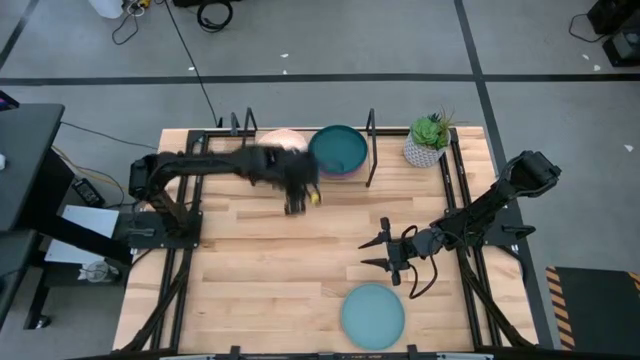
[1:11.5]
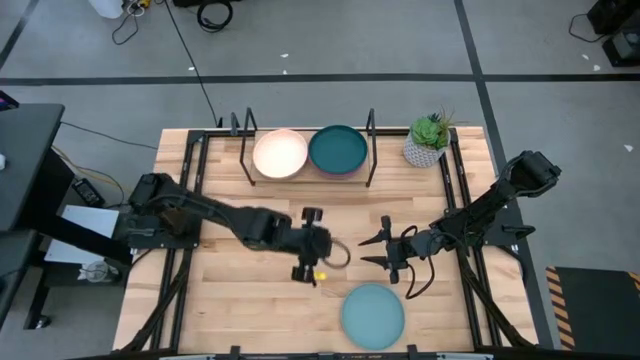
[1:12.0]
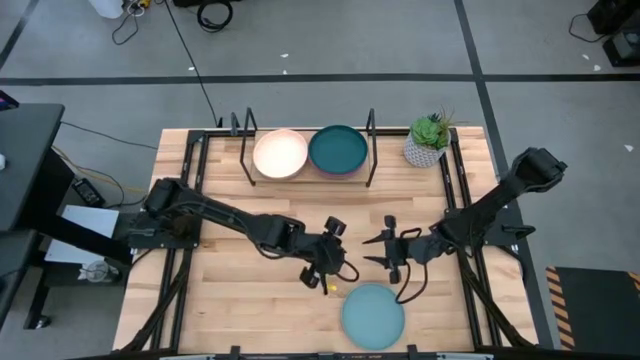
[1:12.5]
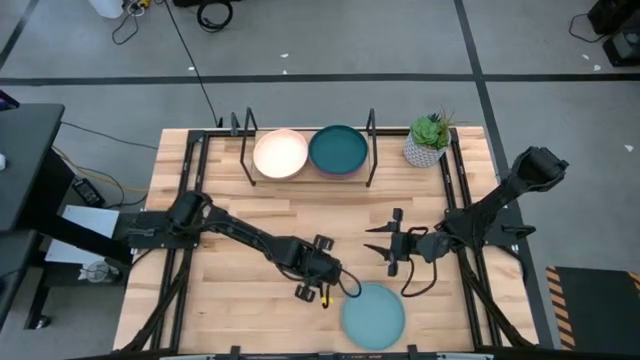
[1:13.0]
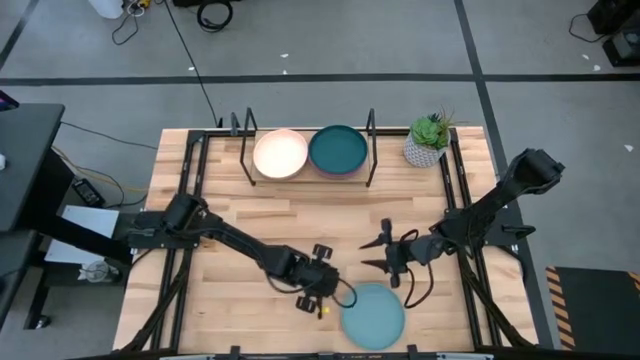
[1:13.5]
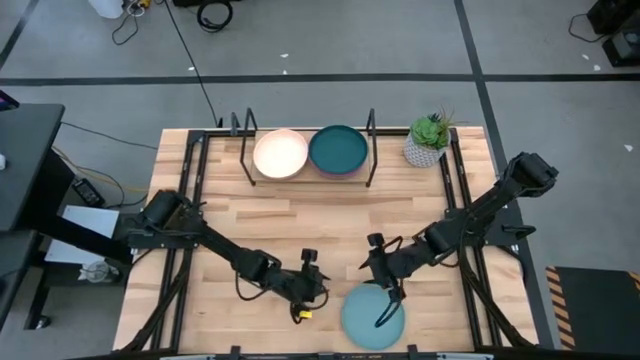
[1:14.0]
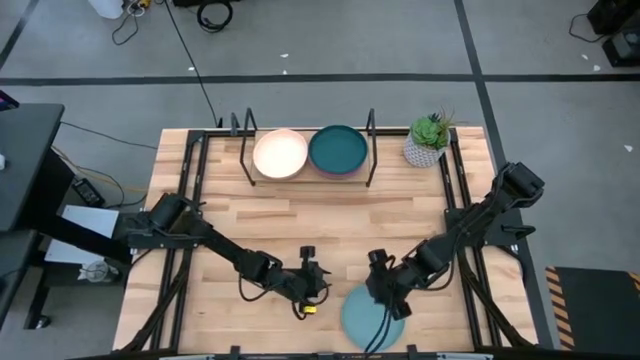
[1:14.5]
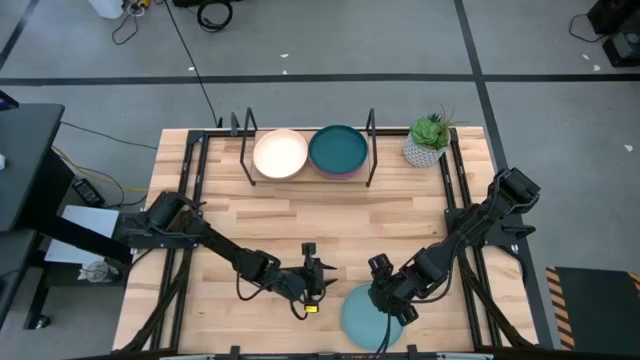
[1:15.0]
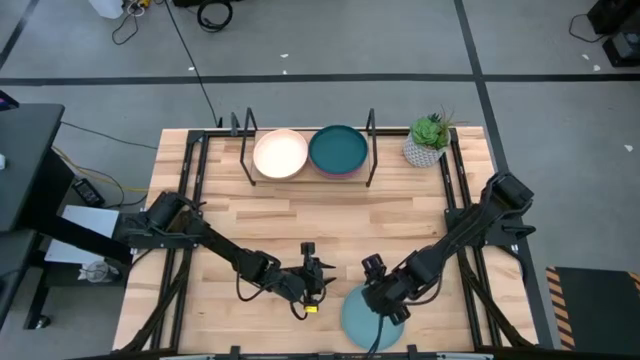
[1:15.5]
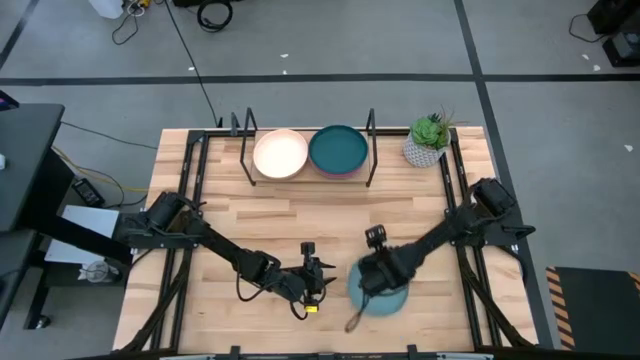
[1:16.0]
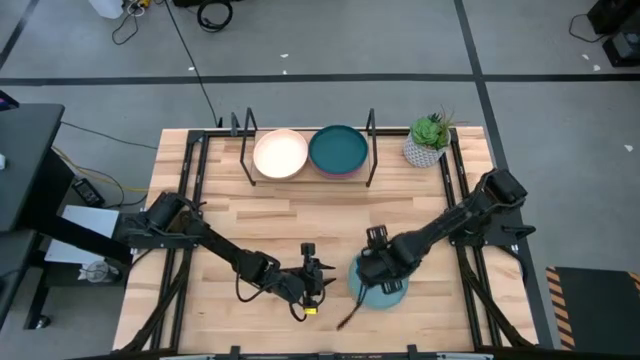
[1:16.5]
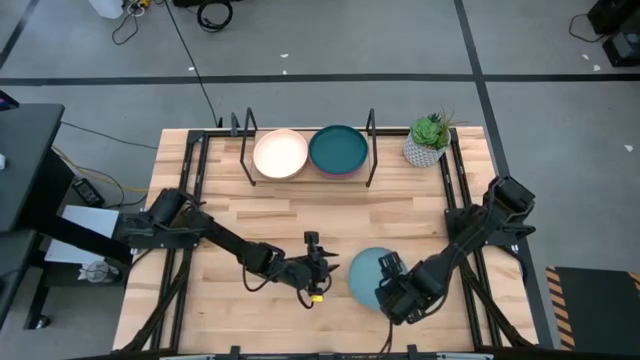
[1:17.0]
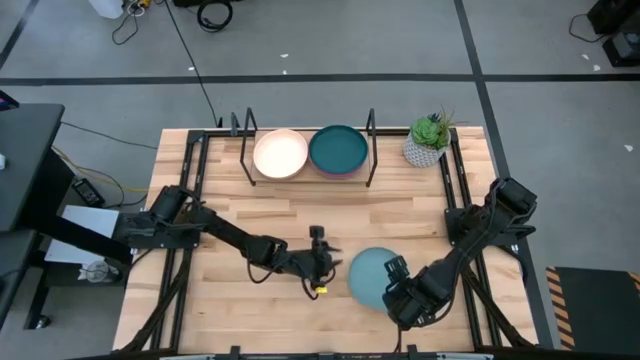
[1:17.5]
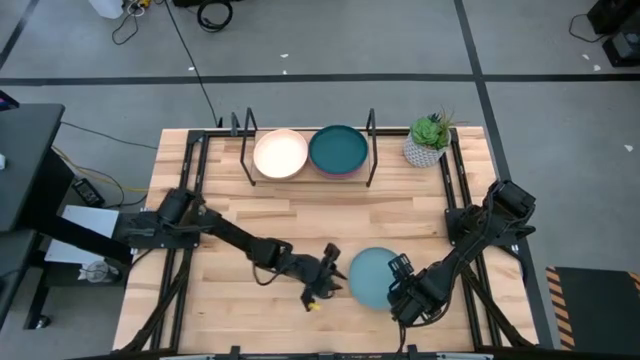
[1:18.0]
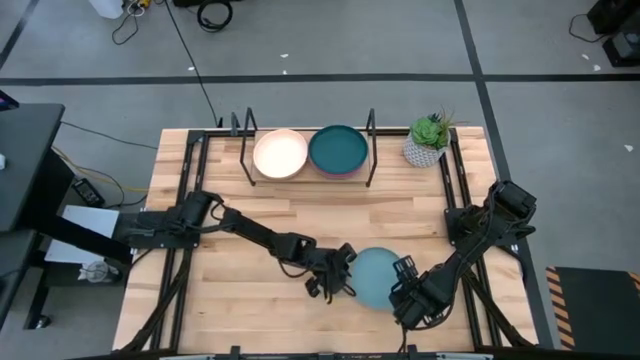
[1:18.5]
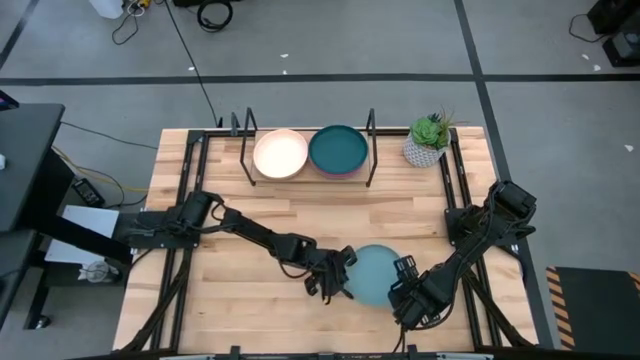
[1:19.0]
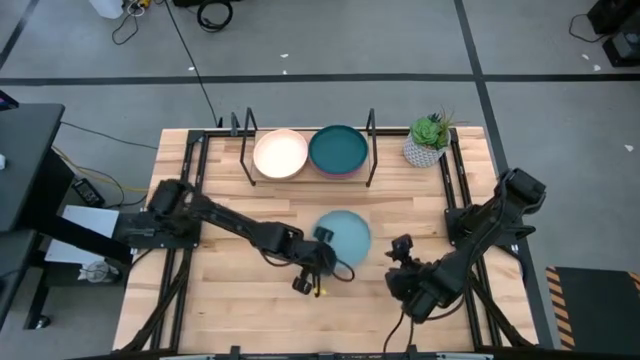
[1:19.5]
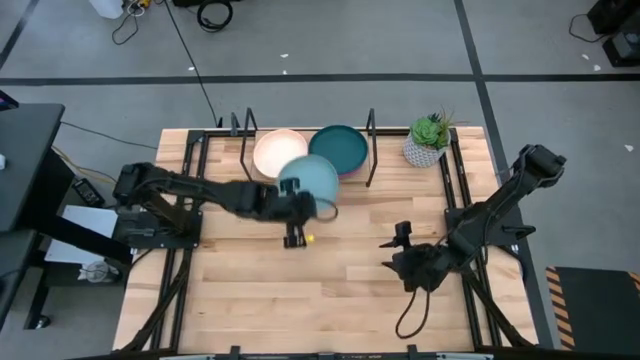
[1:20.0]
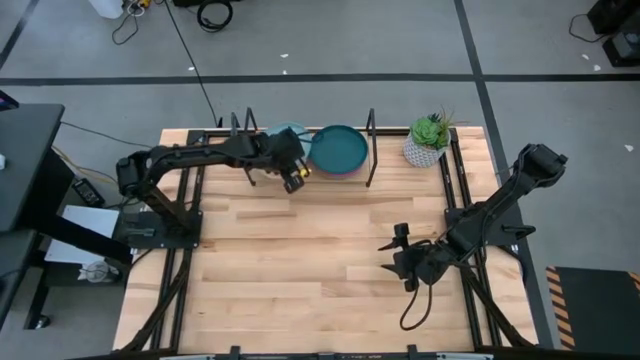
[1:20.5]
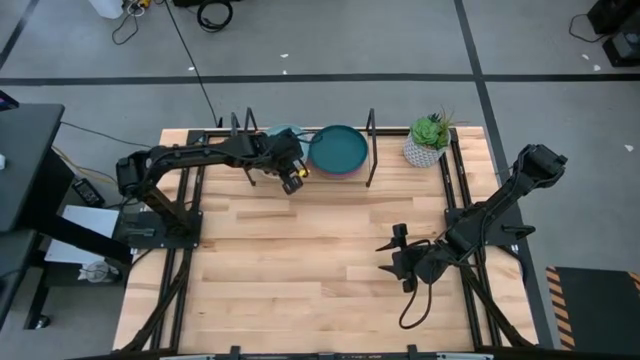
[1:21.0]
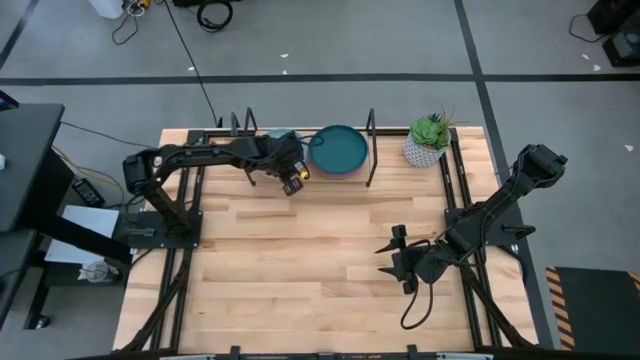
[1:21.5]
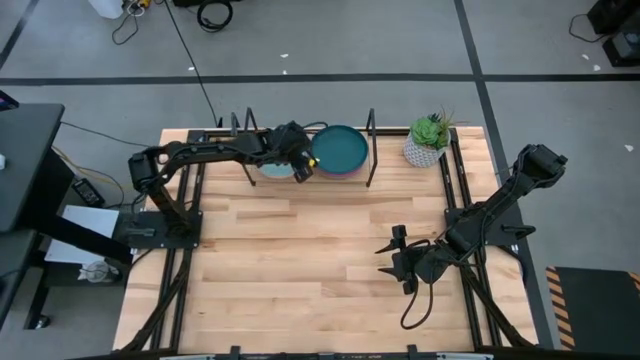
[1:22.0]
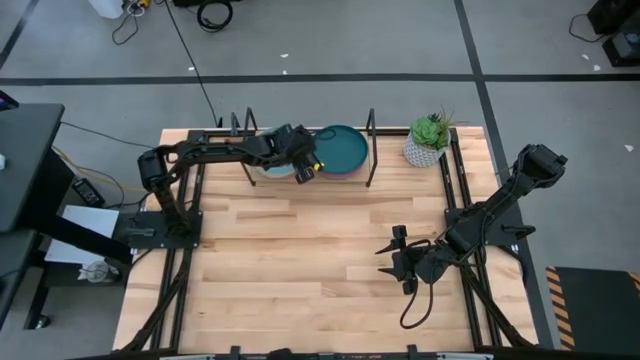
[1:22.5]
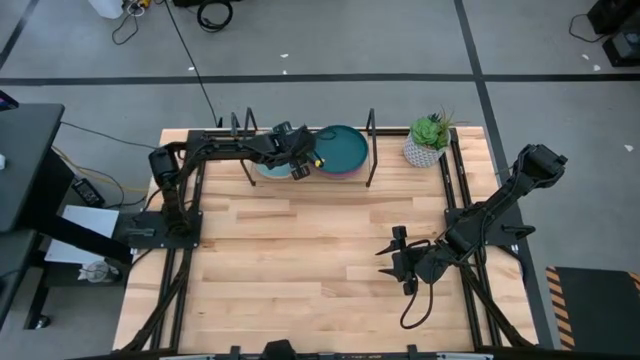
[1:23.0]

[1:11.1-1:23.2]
Task: Place and stack plates onto a shelf
Stack the light green plate on top of the white plate on the shelf

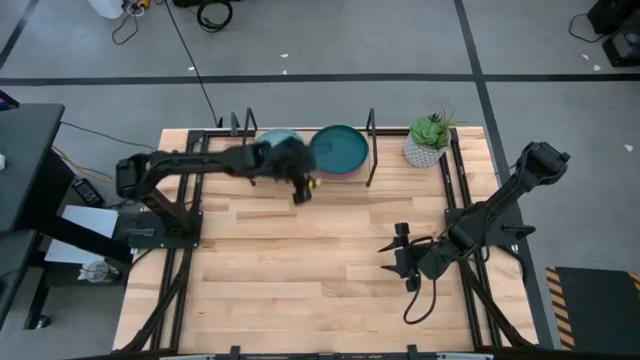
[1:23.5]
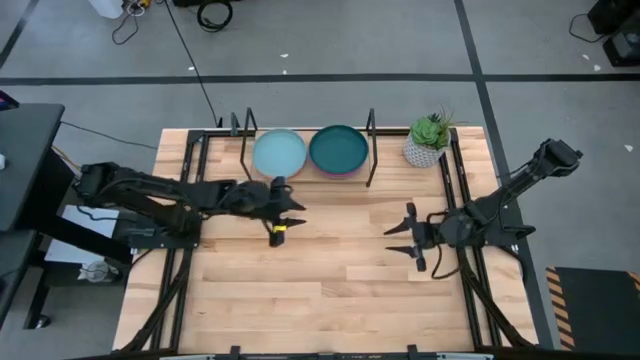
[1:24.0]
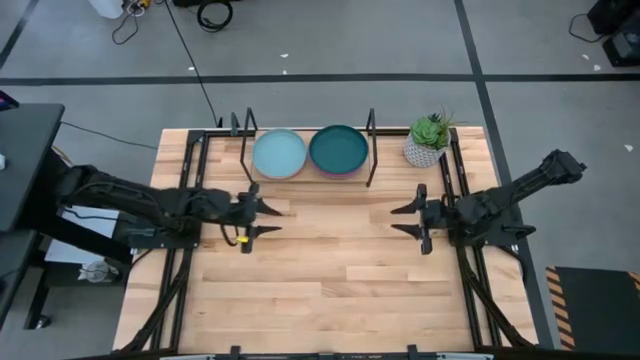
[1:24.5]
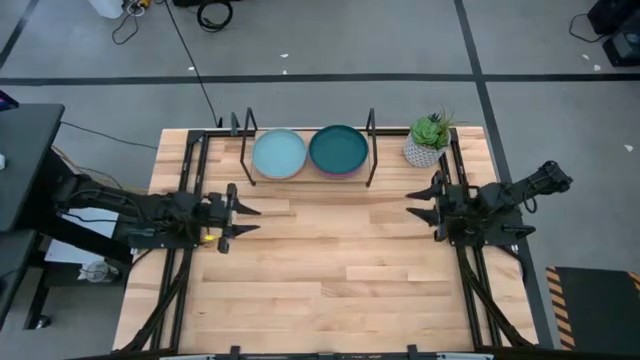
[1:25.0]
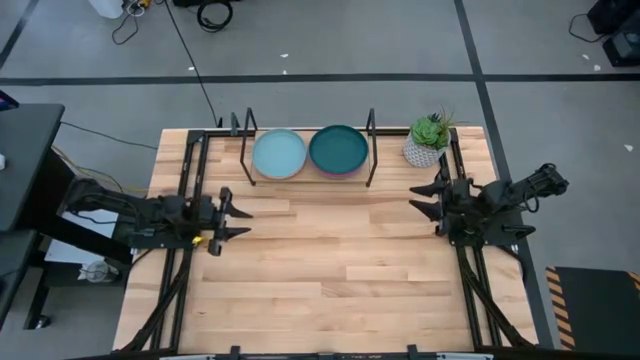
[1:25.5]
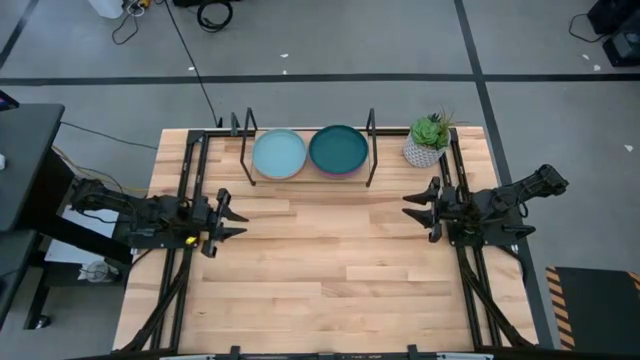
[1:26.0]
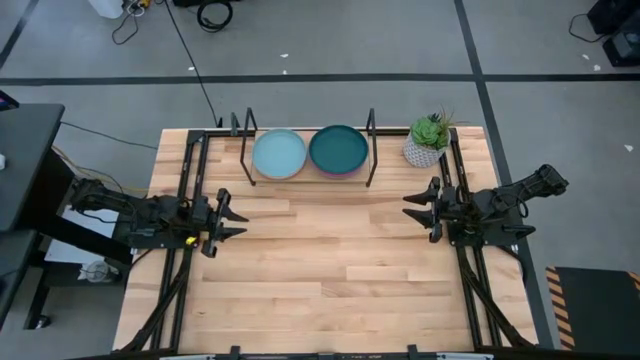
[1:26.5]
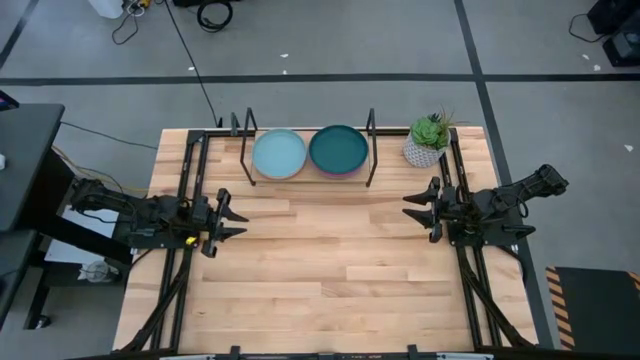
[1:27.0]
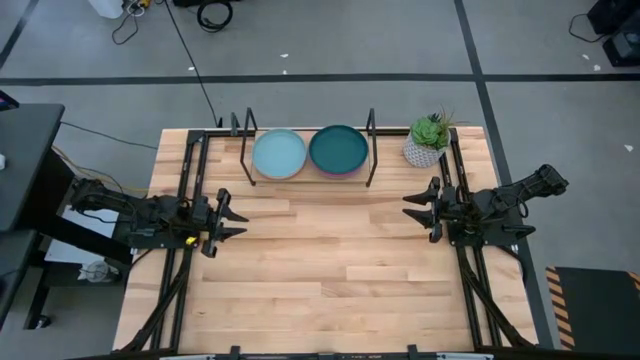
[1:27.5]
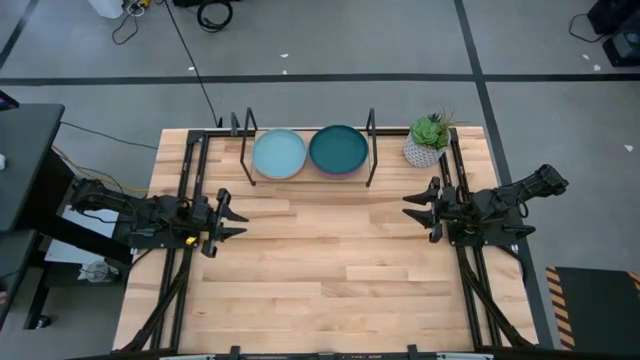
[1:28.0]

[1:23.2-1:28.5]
Return to Home Position

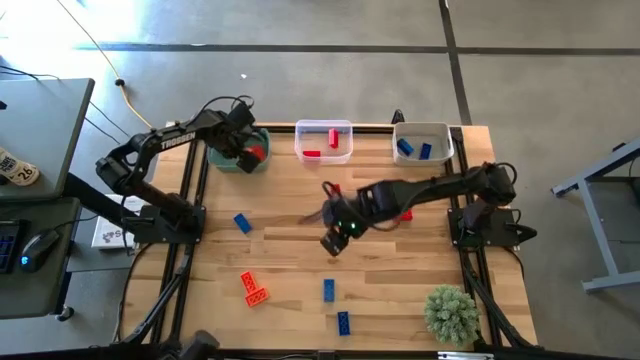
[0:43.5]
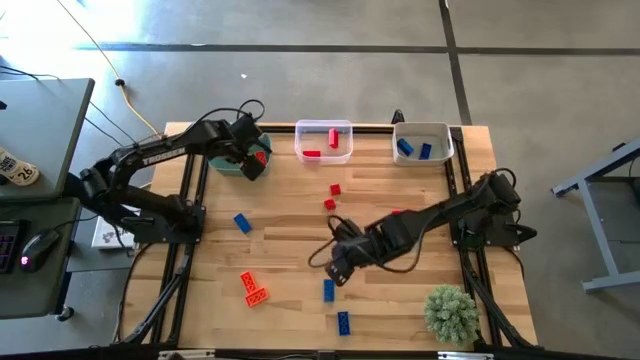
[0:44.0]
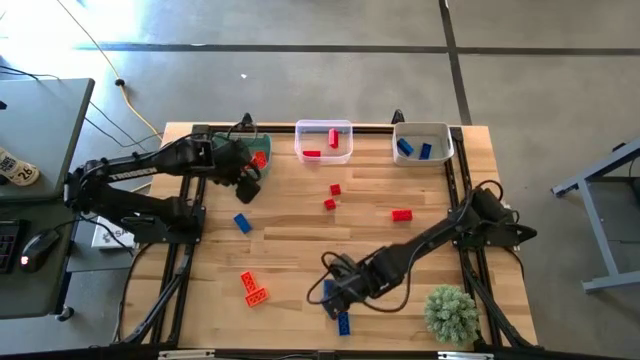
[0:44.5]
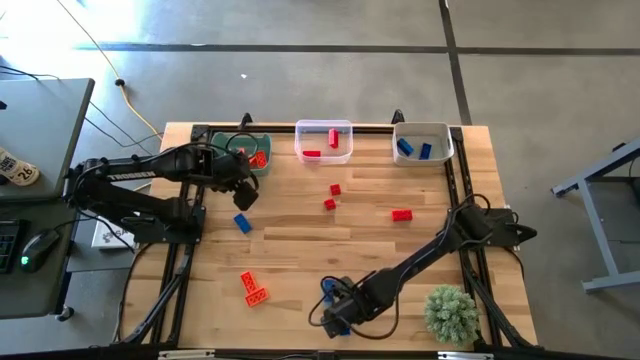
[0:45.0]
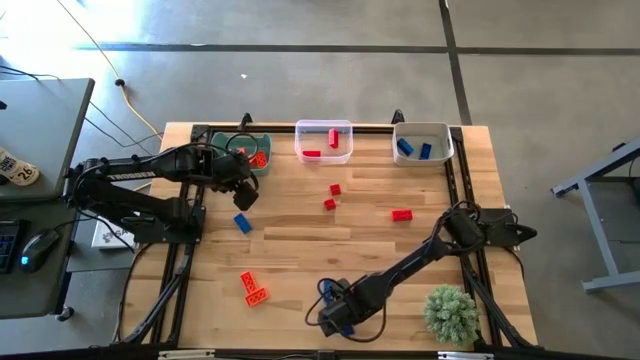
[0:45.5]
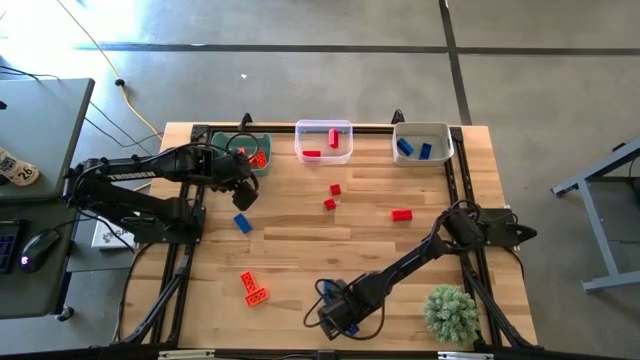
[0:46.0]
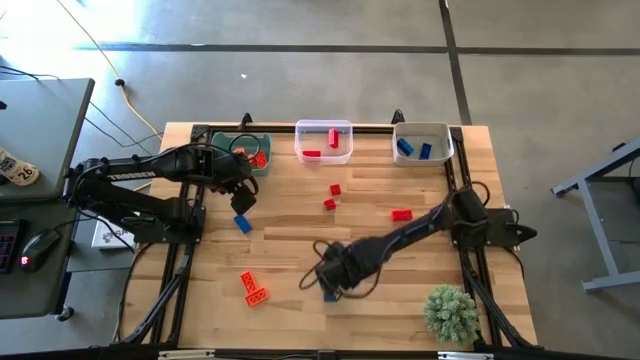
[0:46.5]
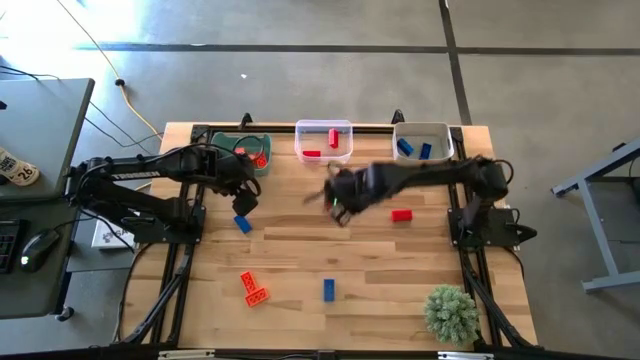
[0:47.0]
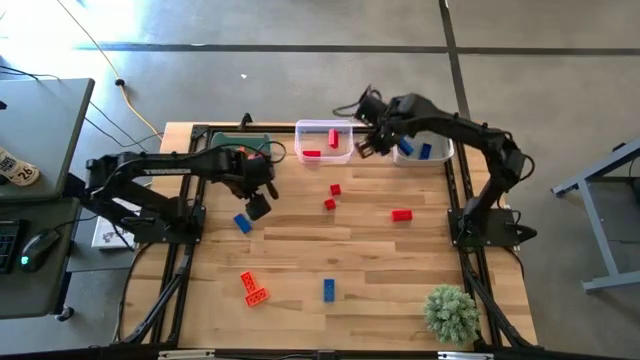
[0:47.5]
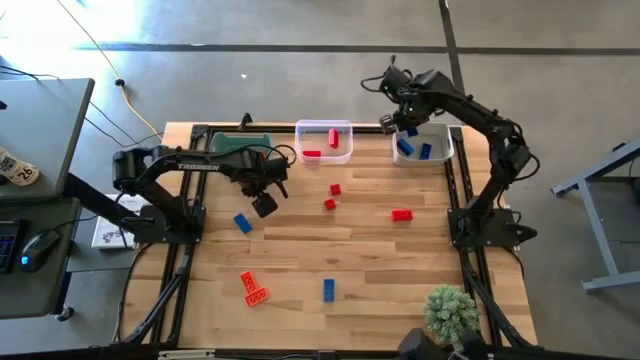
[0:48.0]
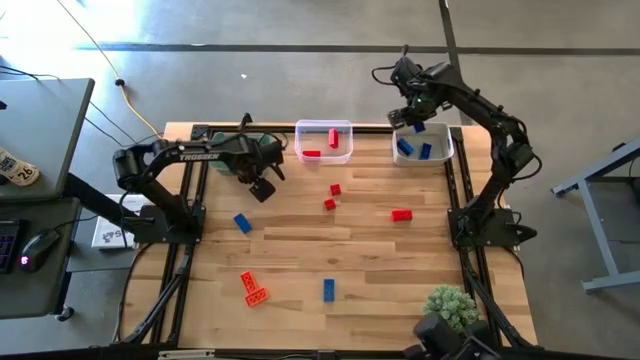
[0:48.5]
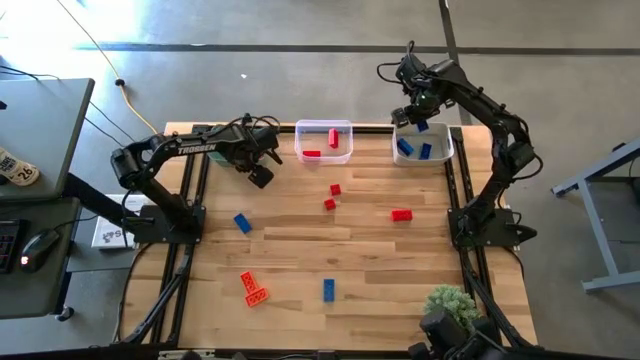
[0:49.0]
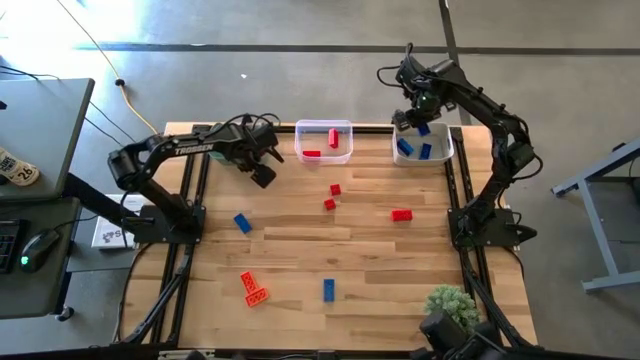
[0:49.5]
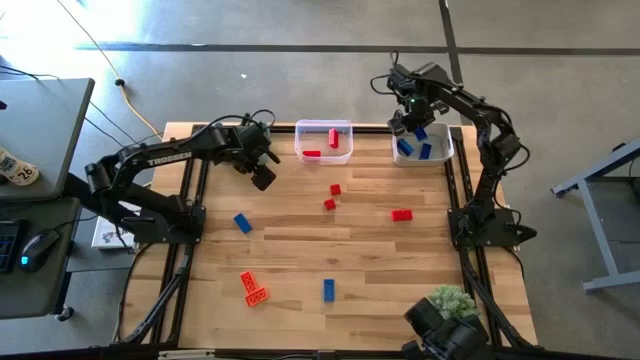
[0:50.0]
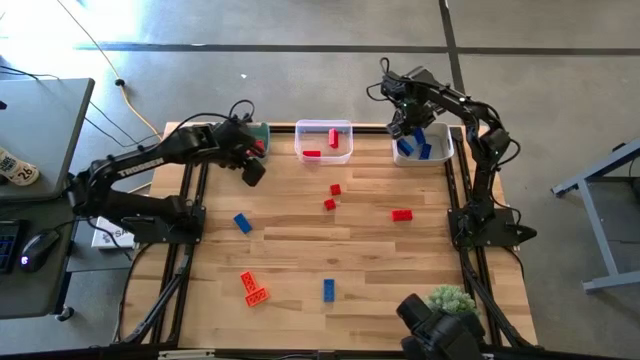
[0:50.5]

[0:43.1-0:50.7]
Task: Sort & place blocks by color
Put the blue game piece into the white bin
